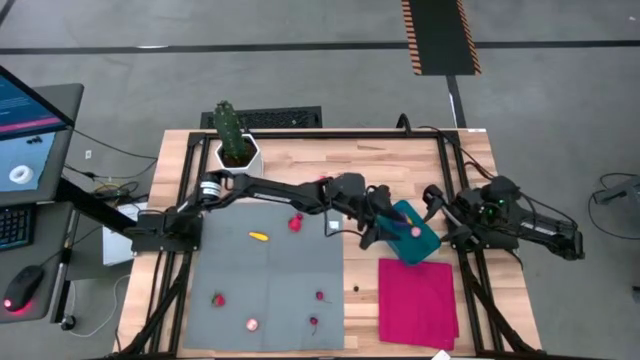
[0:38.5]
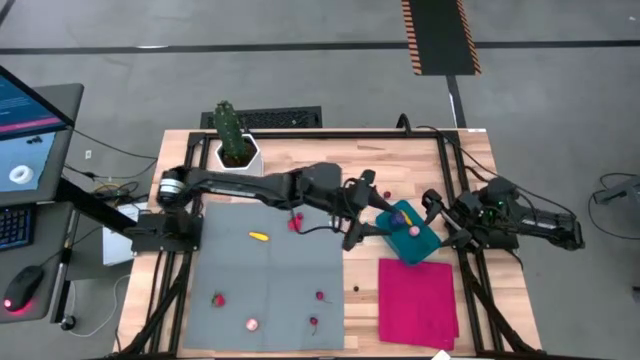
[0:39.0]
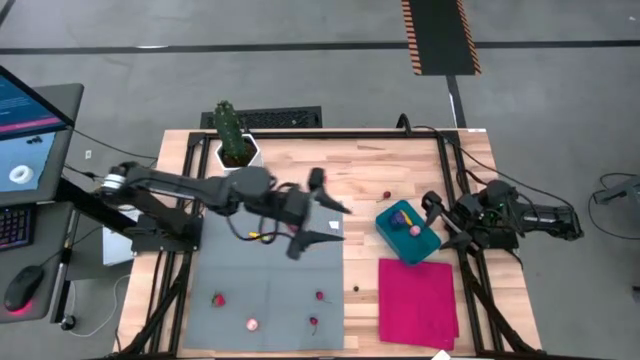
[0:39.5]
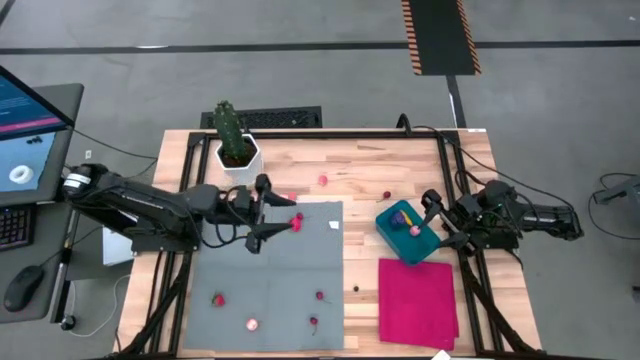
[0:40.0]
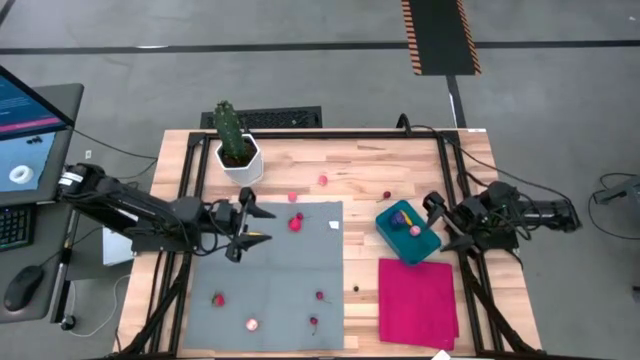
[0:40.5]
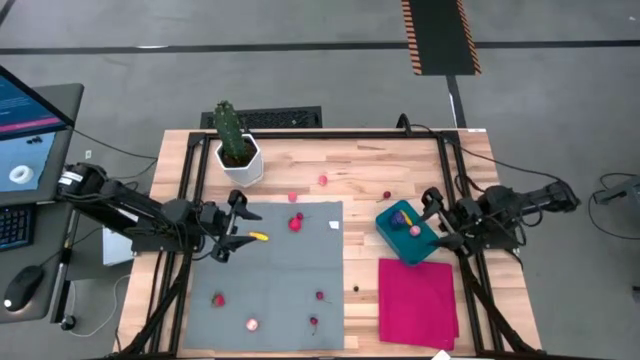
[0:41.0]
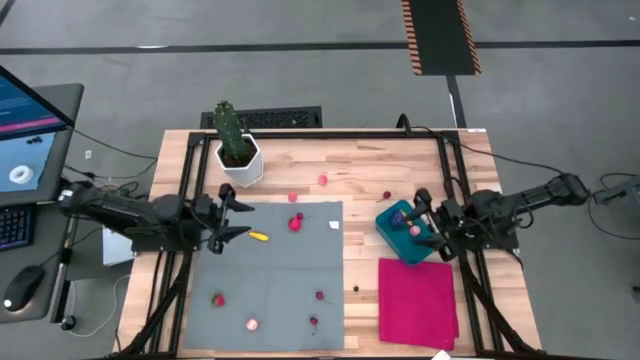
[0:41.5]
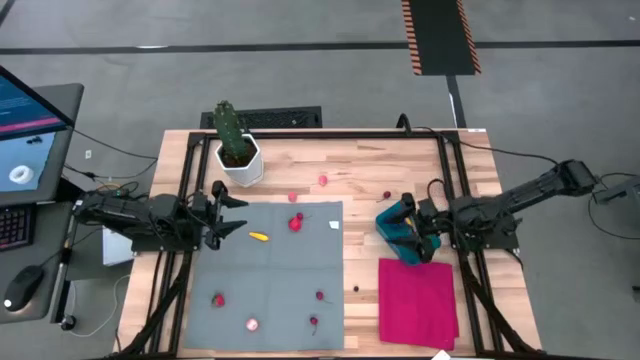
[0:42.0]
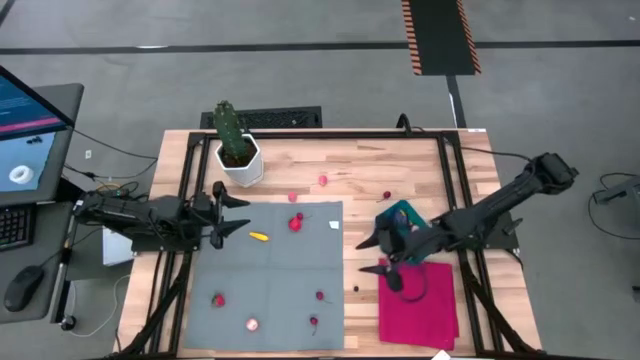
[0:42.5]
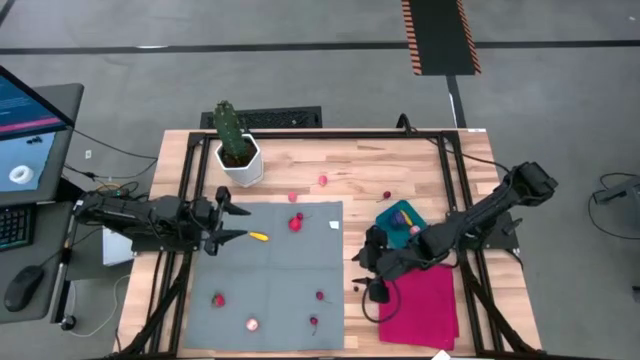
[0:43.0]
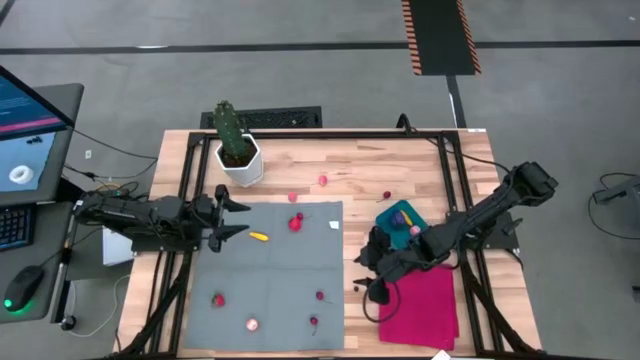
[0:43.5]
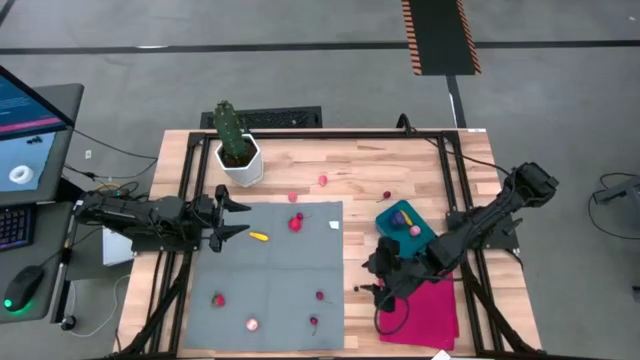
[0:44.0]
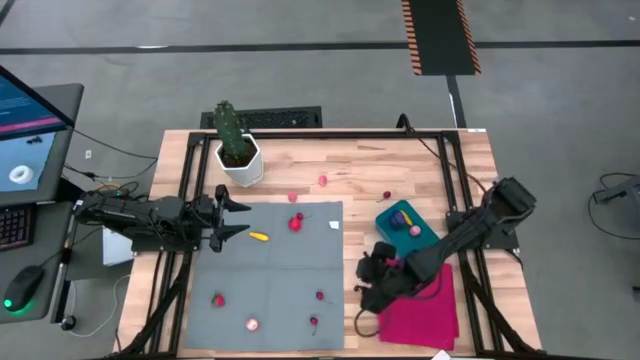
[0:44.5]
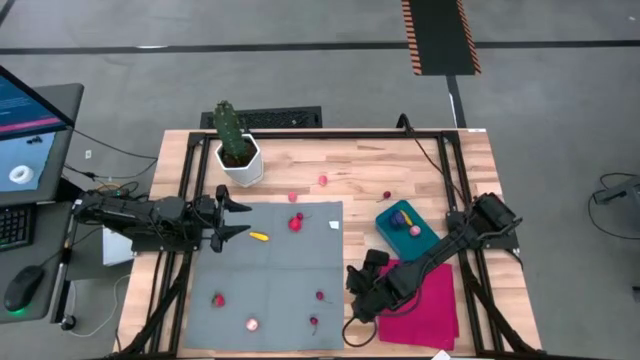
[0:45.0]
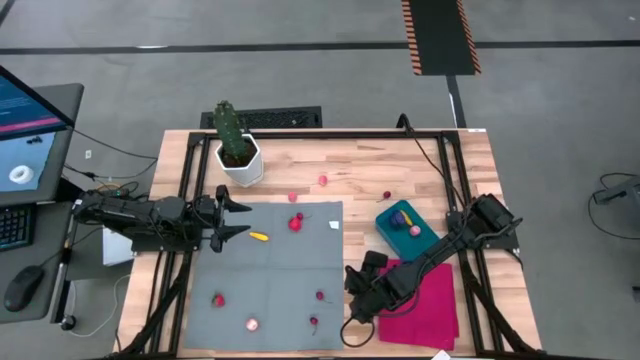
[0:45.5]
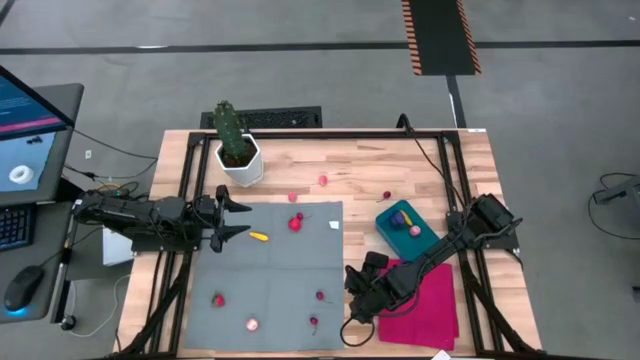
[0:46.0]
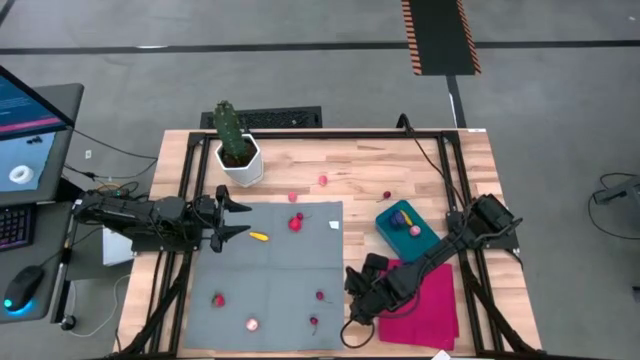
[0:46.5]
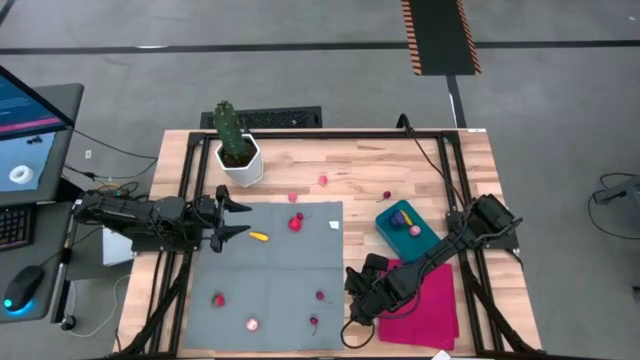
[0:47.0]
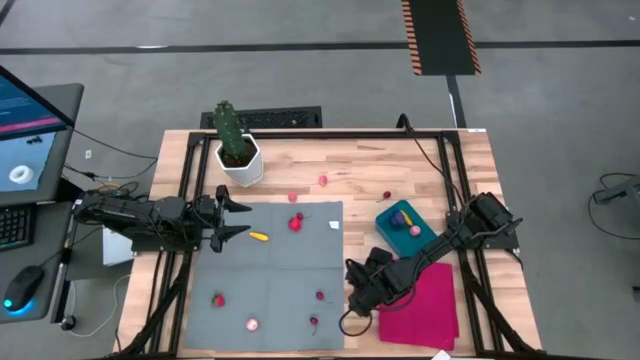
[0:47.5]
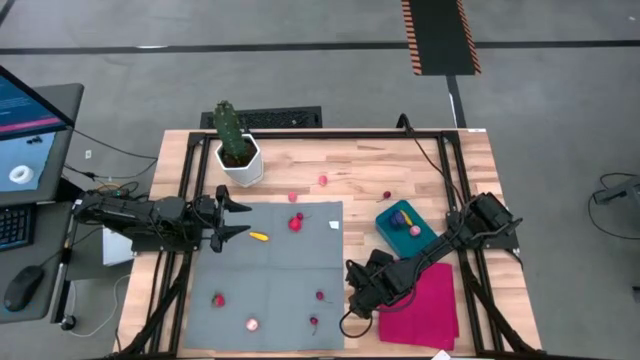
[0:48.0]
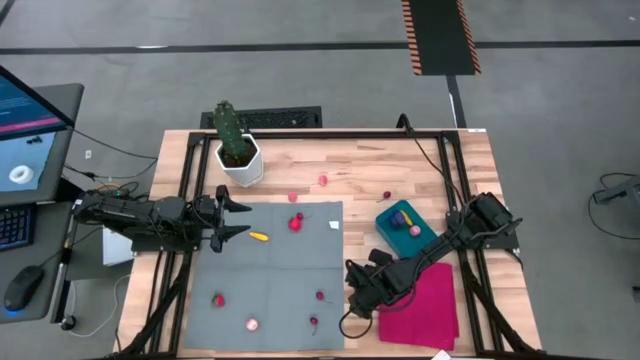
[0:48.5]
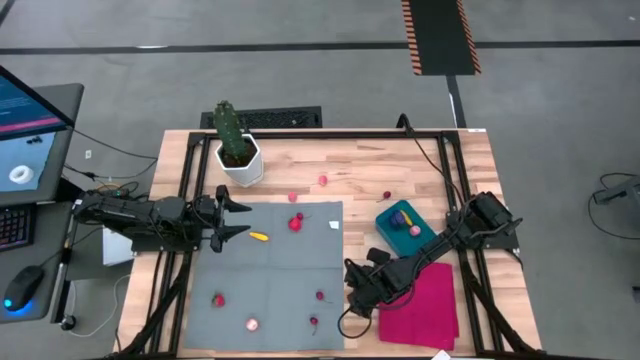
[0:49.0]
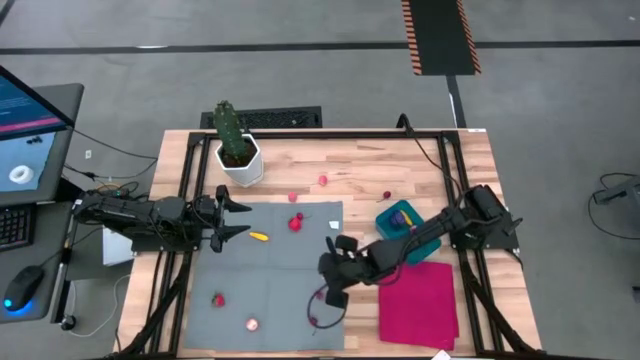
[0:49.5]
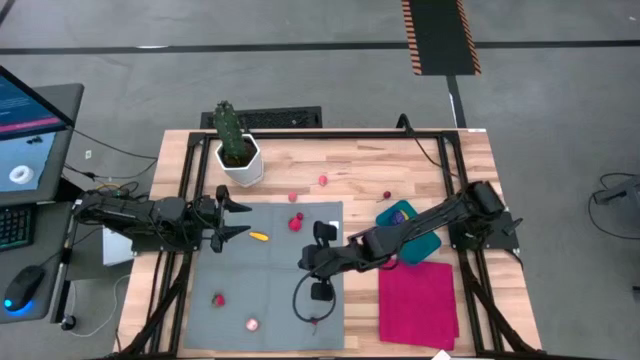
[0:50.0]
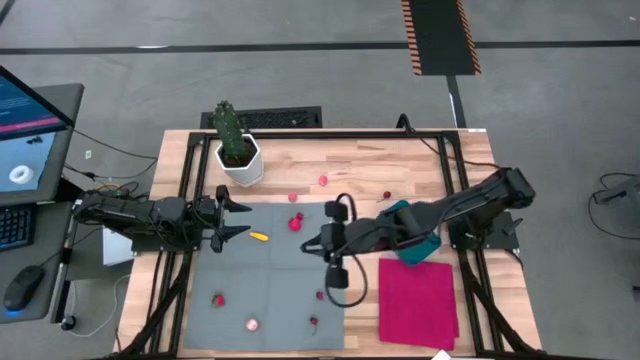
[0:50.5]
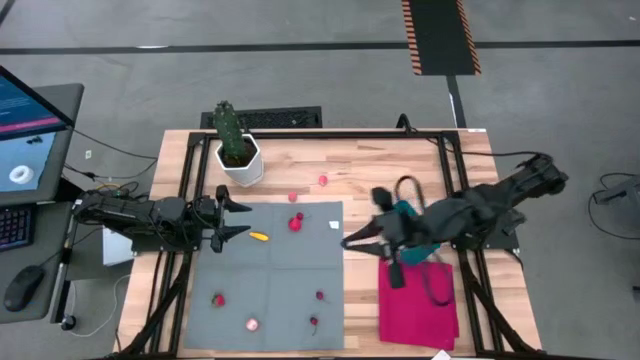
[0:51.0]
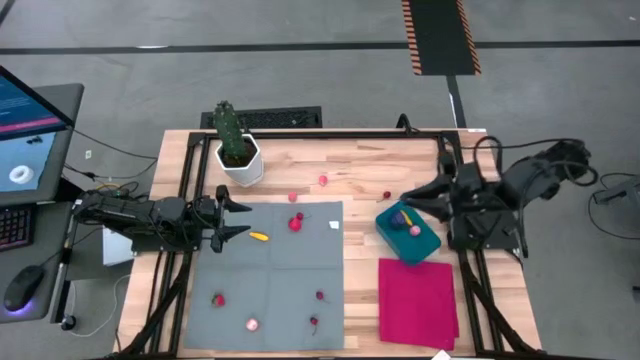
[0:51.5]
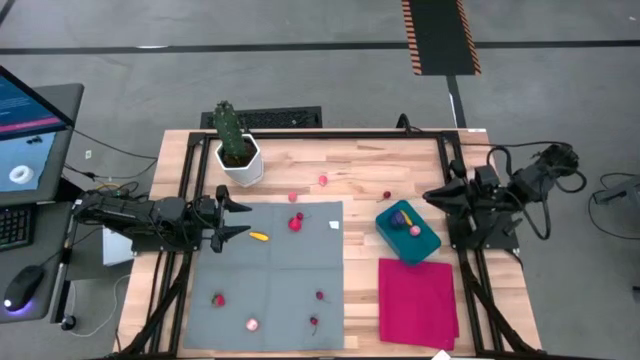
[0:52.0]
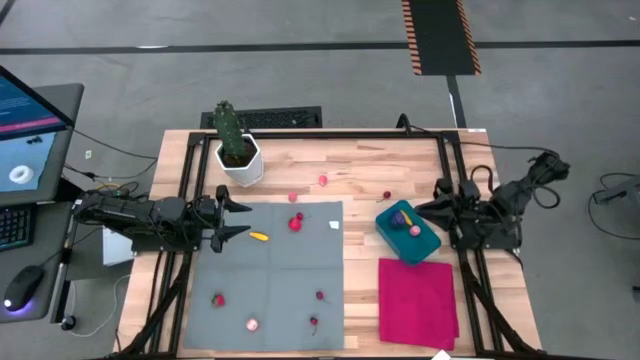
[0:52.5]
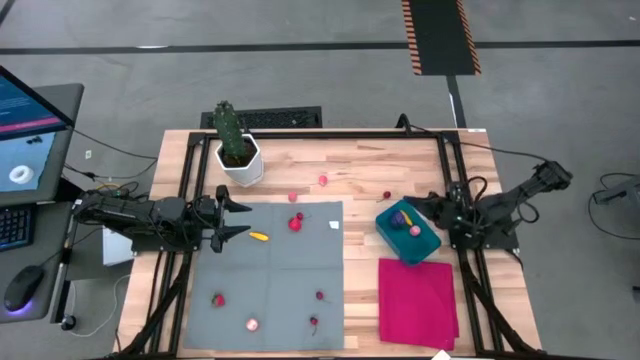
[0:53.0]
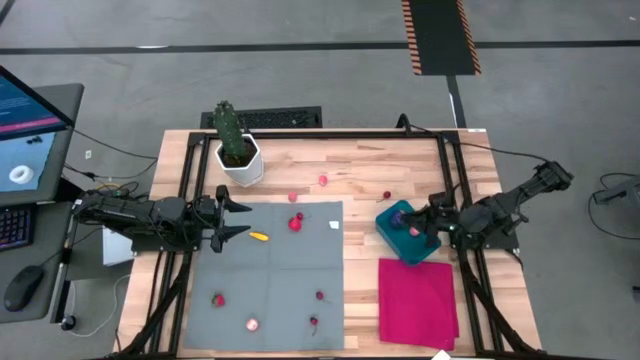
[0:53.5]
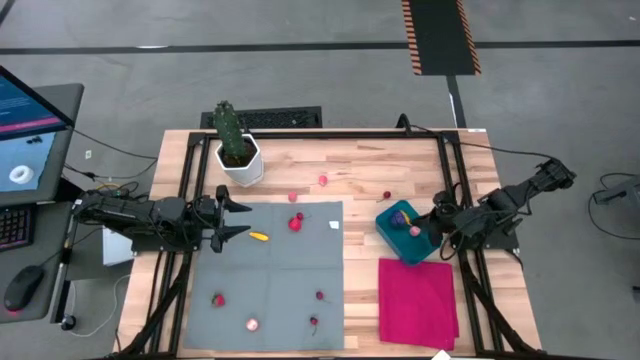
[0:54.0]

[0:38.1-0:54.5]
Task: Pick and placing Produce into tupperware
Put the blueberry into the blue bin

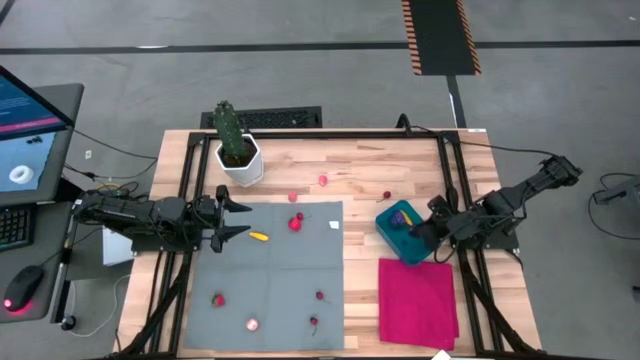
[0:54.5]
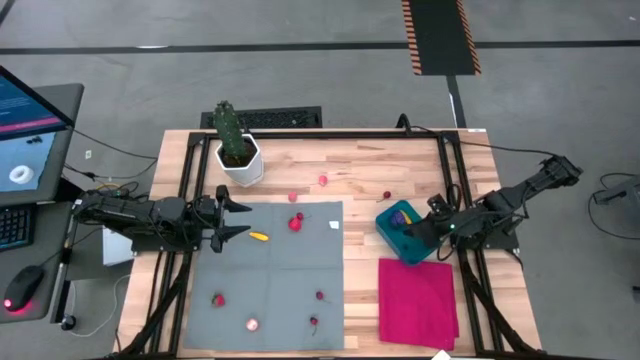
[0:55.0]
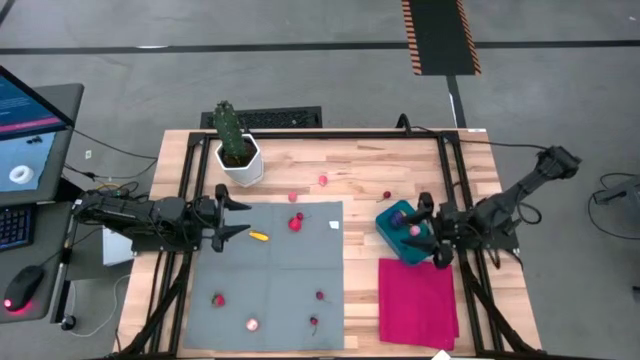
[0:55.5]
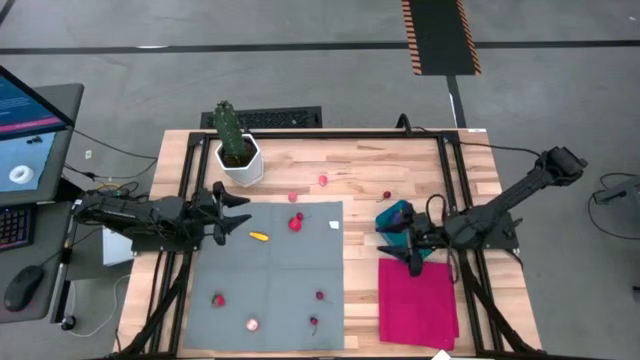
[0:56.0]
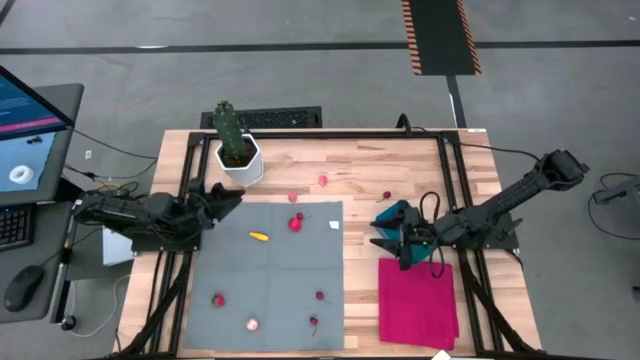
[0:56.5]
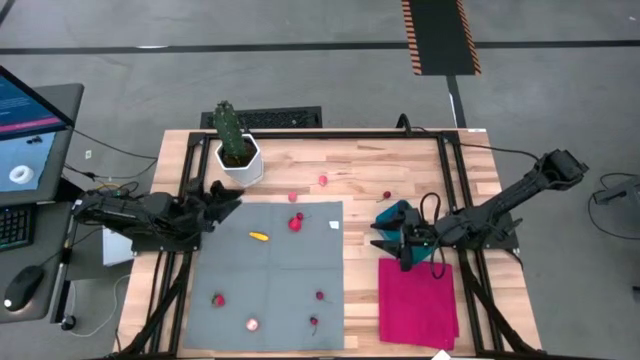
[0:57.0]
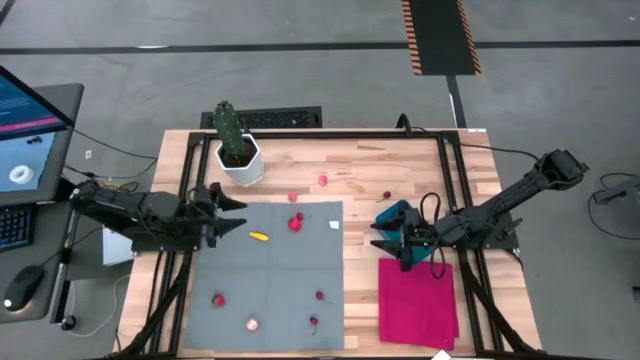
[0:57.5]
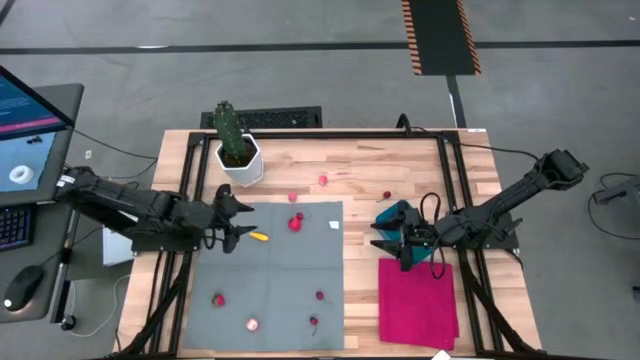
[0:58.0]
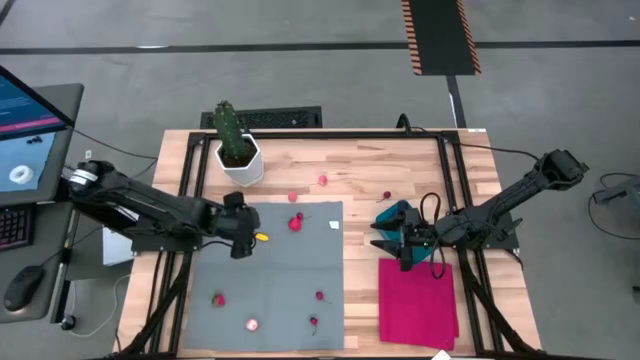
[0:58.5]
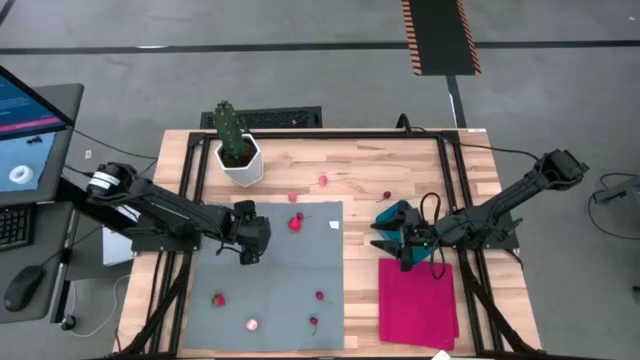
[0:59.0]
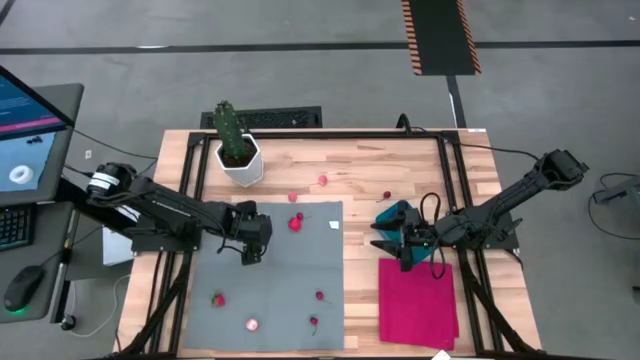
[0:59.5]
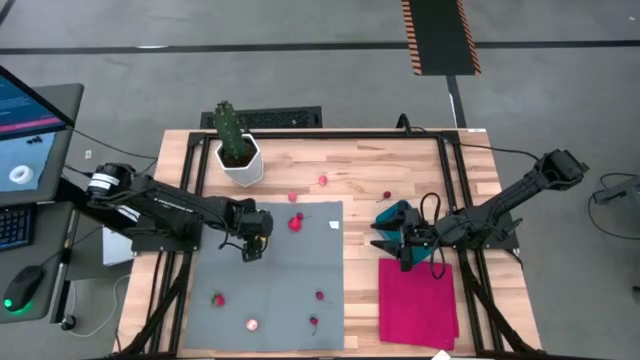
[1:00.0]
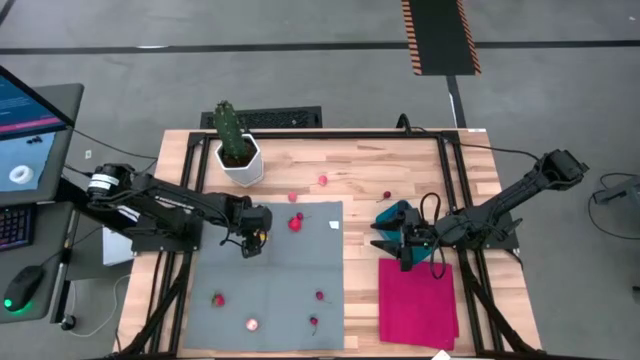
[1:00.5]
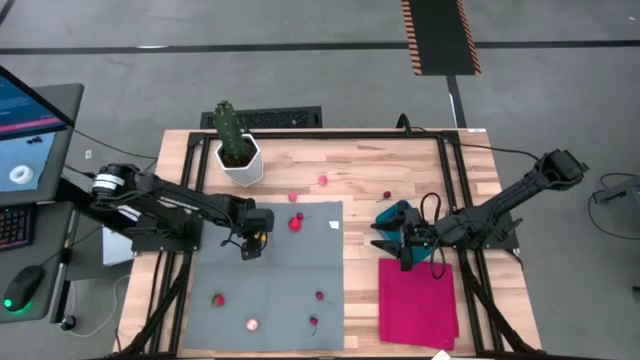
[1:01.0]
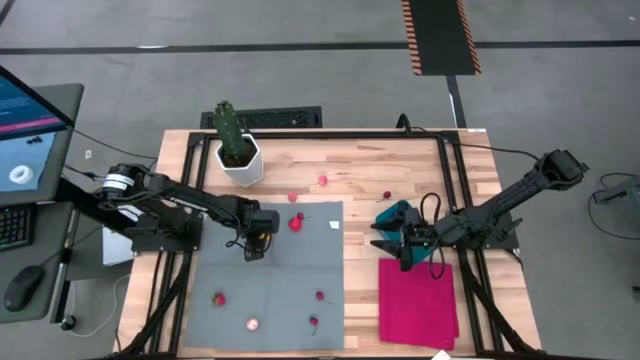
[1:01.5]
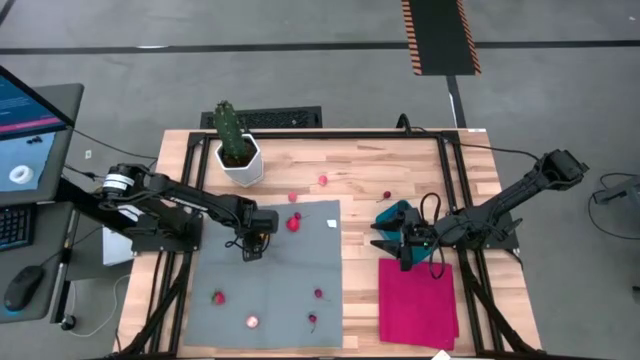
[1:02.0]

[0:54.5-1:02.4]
Put the yellow corn into the blue bin
